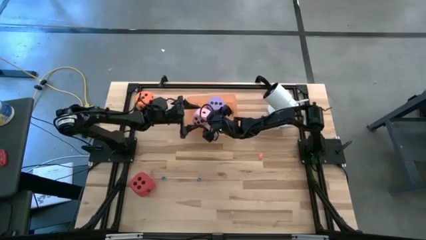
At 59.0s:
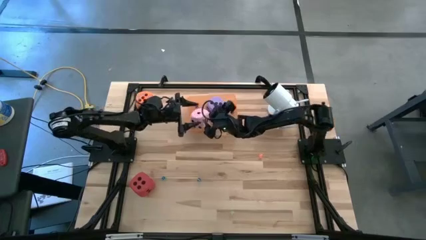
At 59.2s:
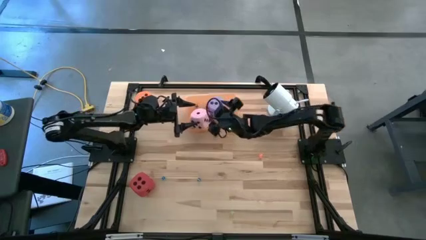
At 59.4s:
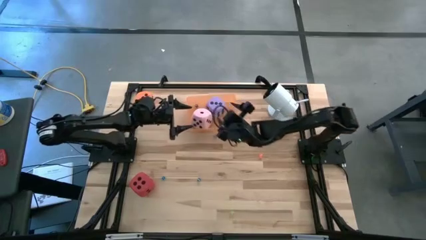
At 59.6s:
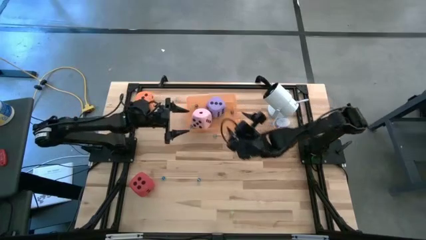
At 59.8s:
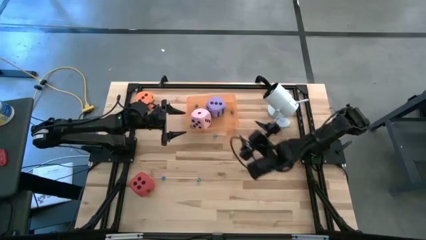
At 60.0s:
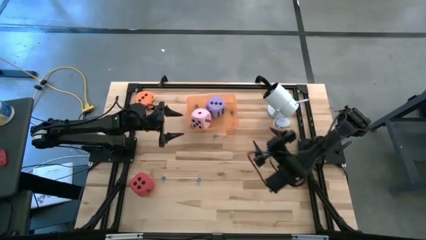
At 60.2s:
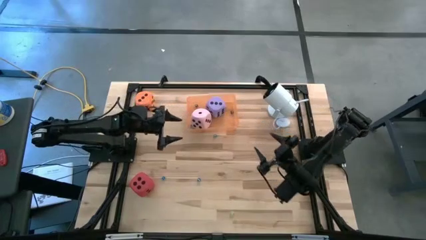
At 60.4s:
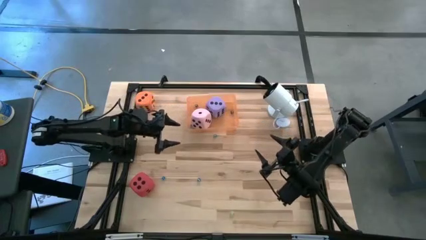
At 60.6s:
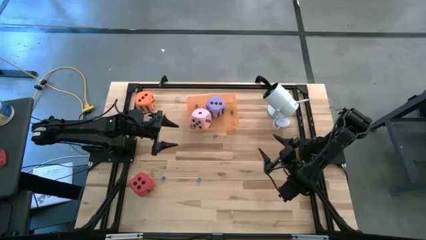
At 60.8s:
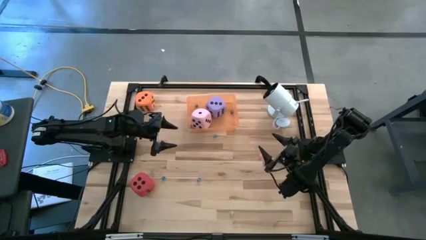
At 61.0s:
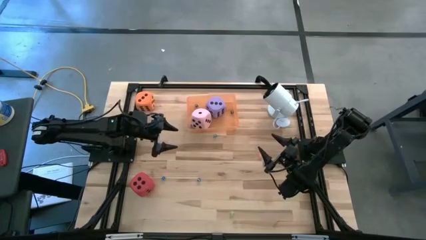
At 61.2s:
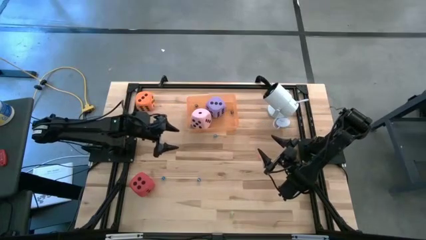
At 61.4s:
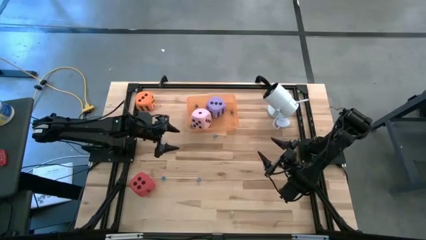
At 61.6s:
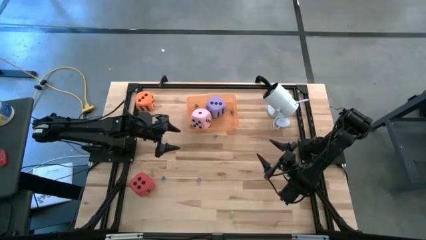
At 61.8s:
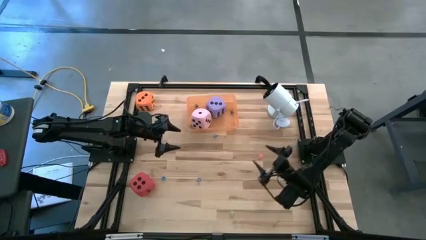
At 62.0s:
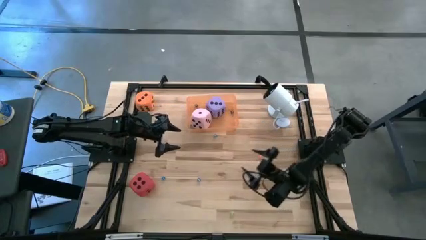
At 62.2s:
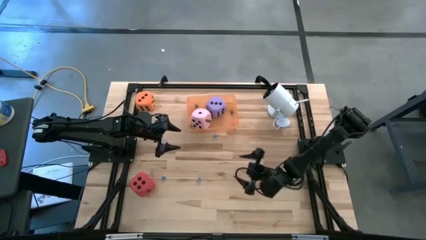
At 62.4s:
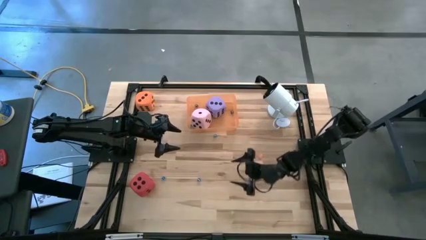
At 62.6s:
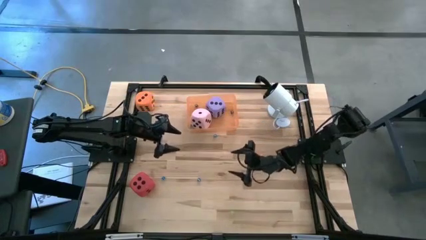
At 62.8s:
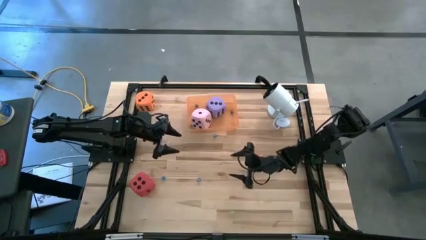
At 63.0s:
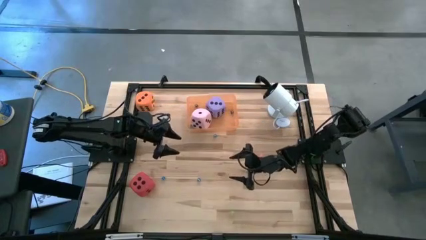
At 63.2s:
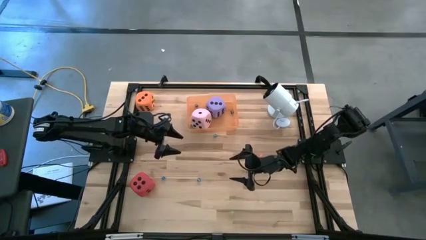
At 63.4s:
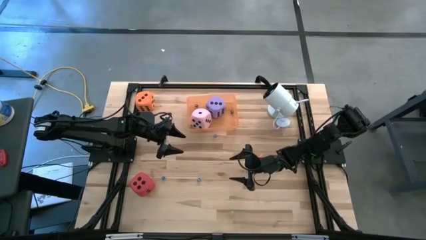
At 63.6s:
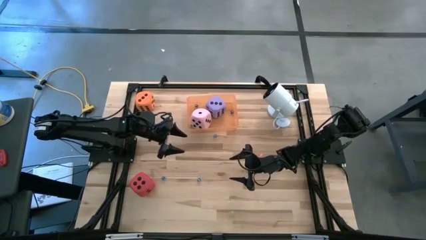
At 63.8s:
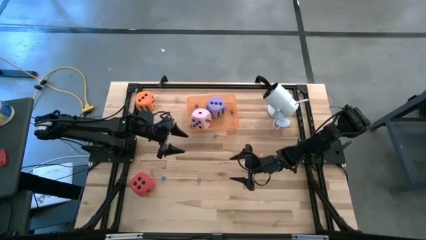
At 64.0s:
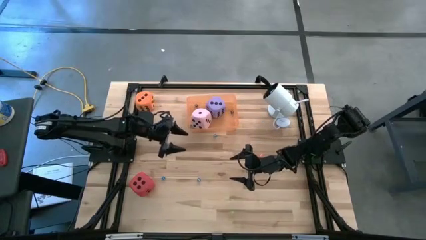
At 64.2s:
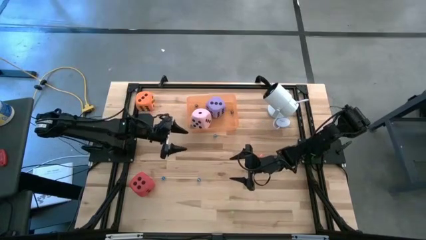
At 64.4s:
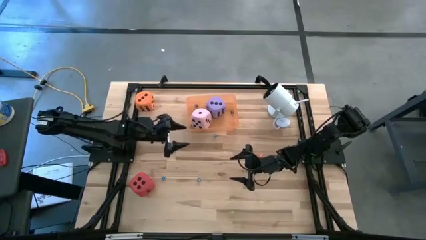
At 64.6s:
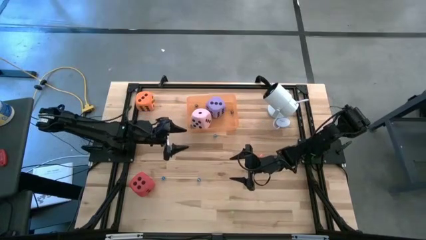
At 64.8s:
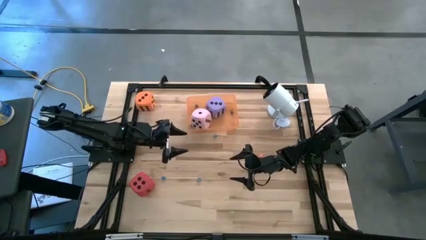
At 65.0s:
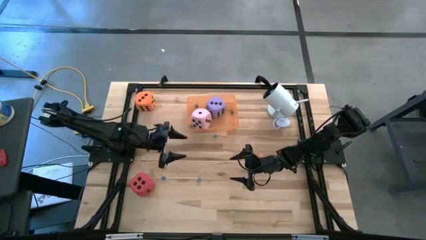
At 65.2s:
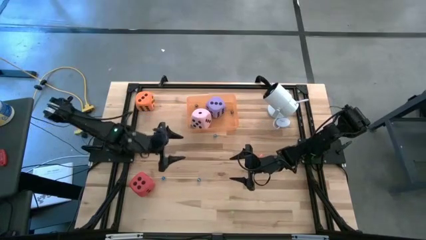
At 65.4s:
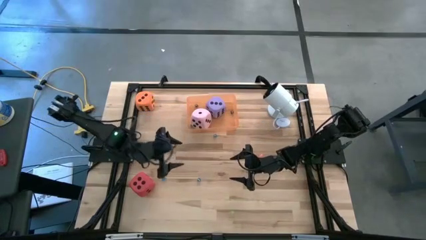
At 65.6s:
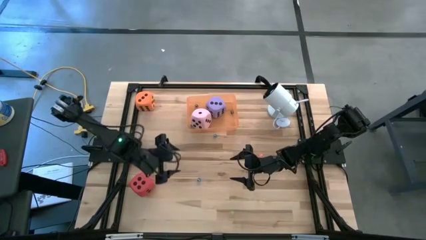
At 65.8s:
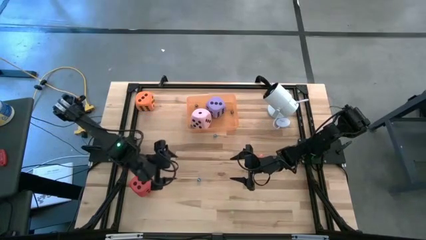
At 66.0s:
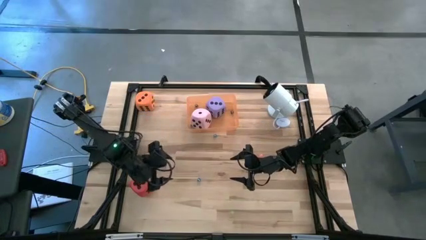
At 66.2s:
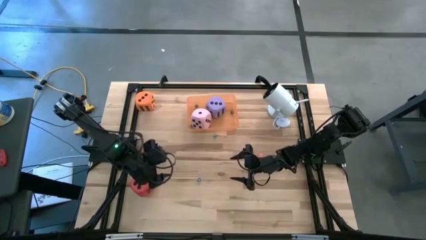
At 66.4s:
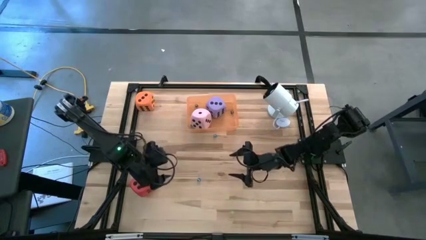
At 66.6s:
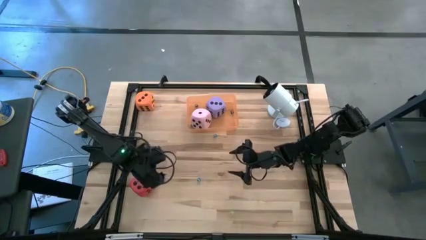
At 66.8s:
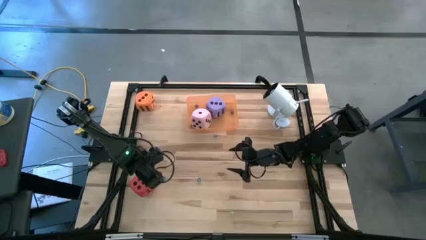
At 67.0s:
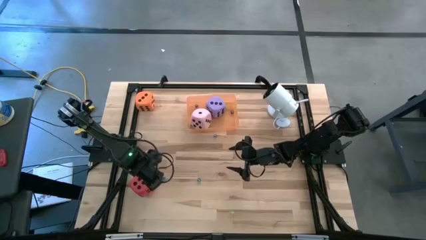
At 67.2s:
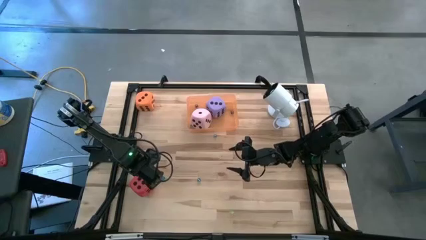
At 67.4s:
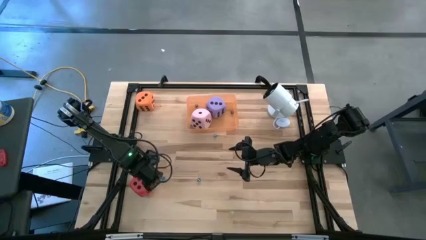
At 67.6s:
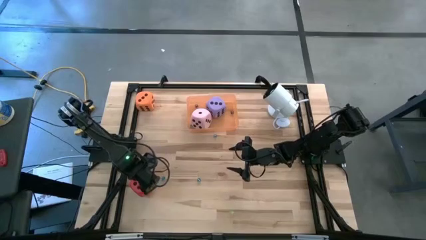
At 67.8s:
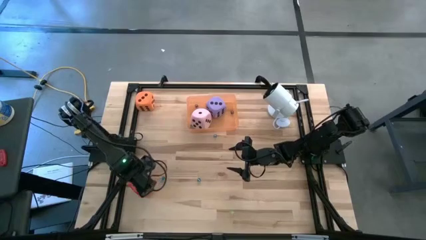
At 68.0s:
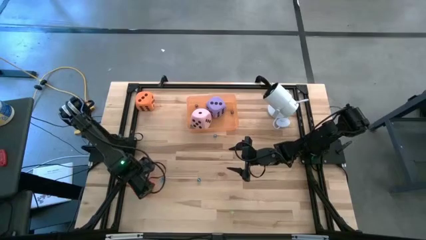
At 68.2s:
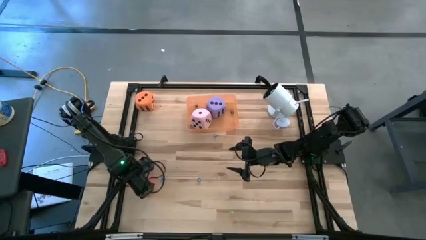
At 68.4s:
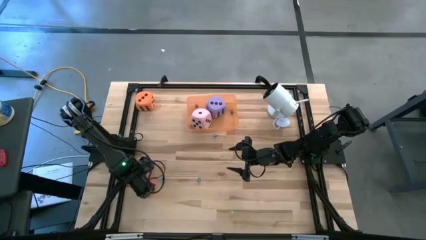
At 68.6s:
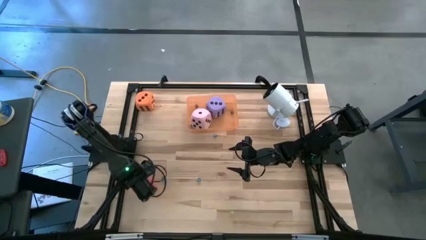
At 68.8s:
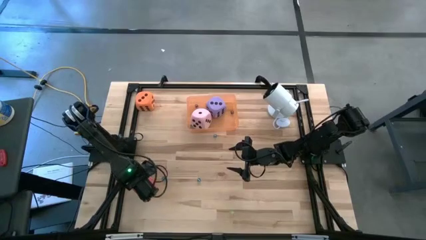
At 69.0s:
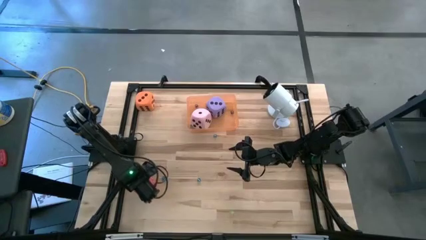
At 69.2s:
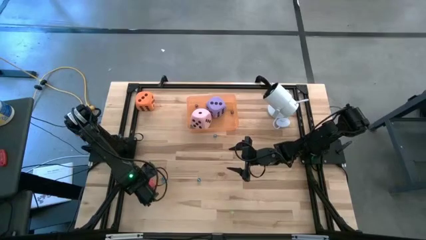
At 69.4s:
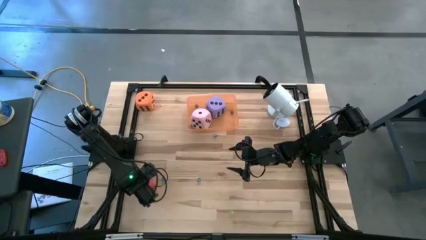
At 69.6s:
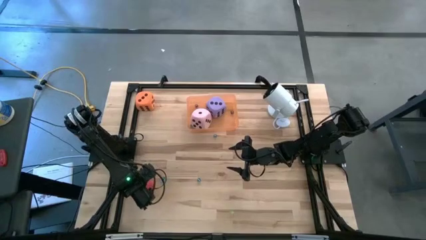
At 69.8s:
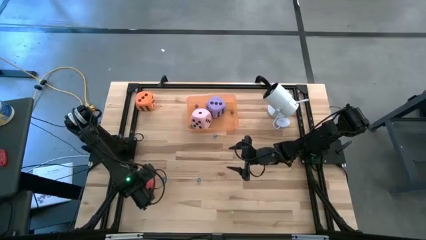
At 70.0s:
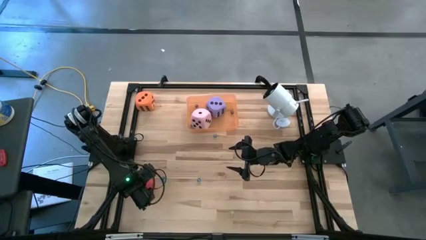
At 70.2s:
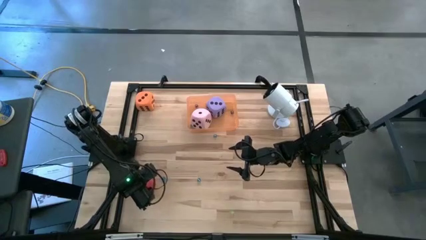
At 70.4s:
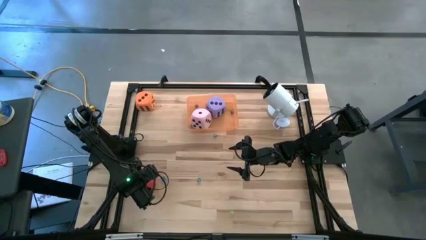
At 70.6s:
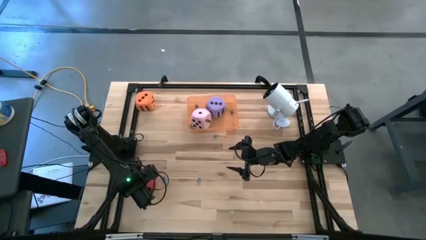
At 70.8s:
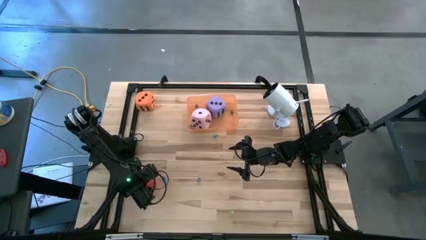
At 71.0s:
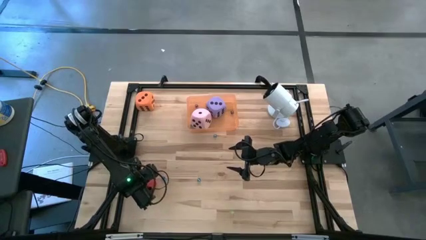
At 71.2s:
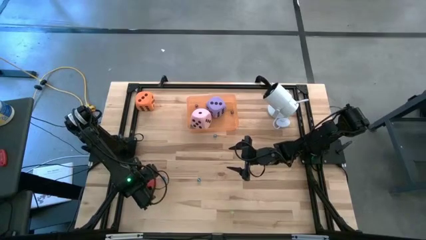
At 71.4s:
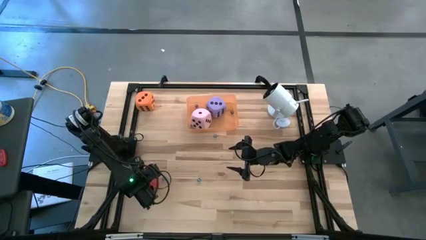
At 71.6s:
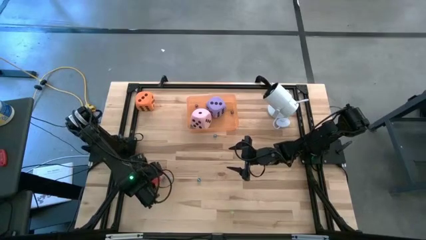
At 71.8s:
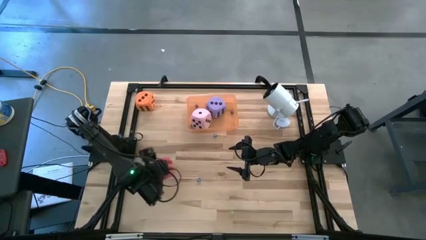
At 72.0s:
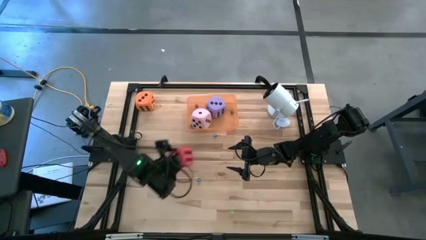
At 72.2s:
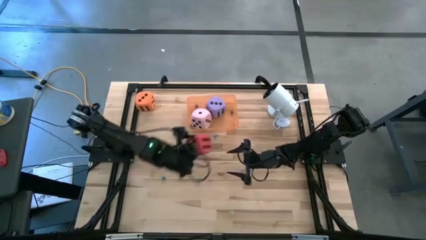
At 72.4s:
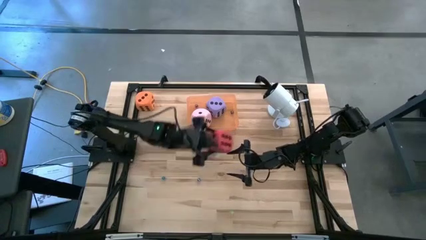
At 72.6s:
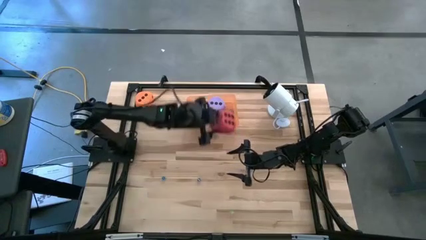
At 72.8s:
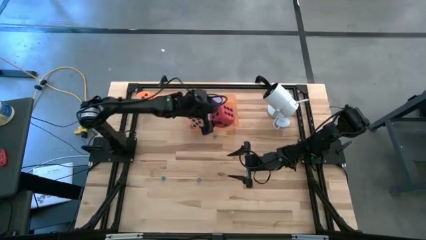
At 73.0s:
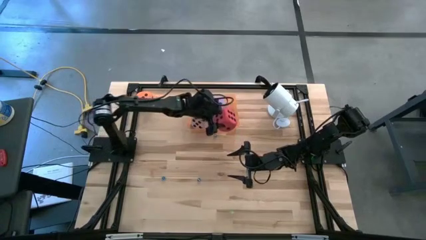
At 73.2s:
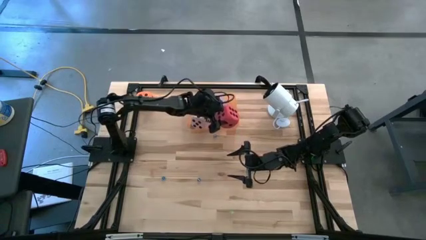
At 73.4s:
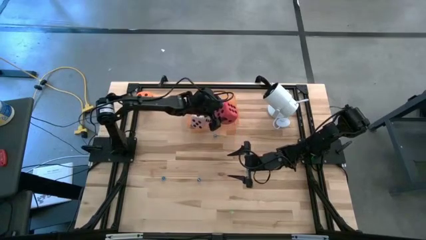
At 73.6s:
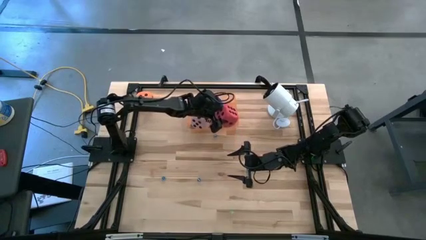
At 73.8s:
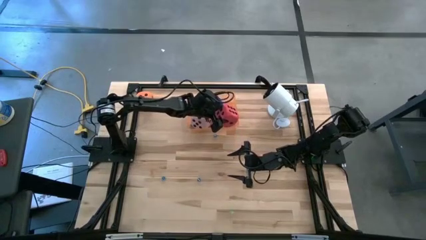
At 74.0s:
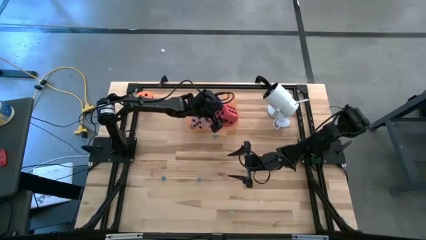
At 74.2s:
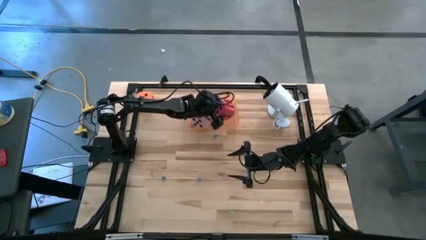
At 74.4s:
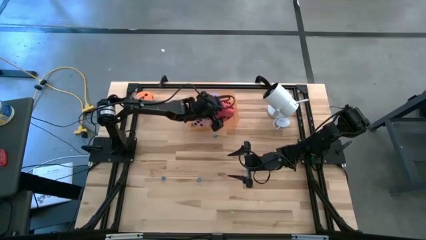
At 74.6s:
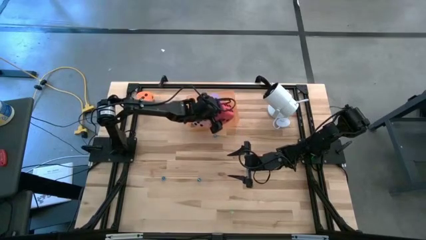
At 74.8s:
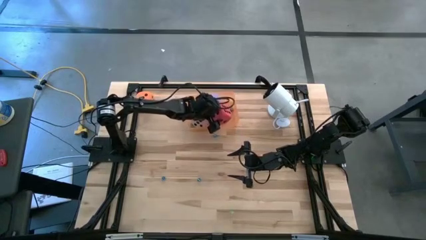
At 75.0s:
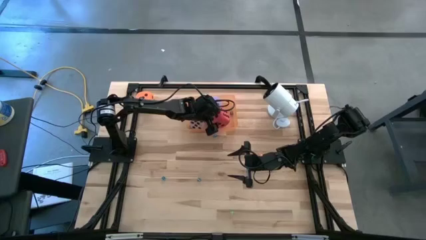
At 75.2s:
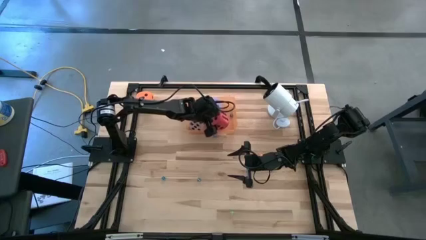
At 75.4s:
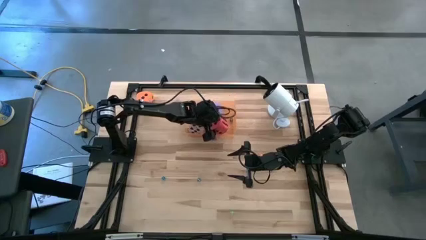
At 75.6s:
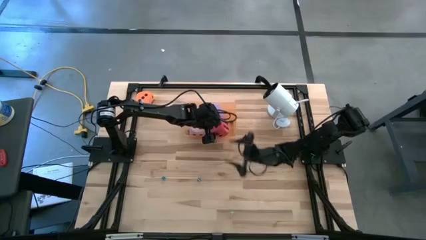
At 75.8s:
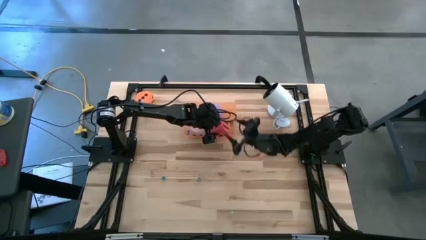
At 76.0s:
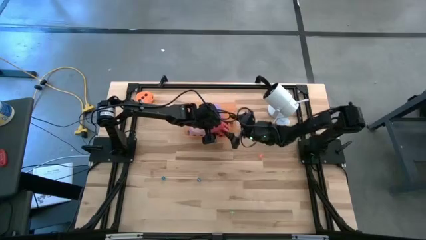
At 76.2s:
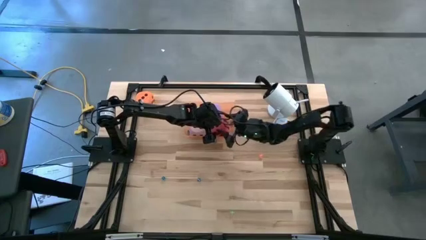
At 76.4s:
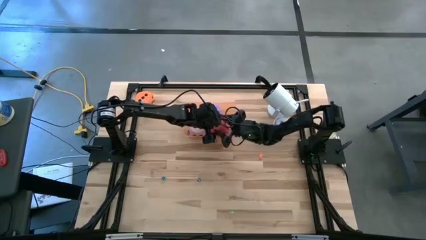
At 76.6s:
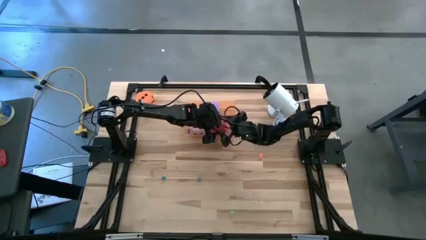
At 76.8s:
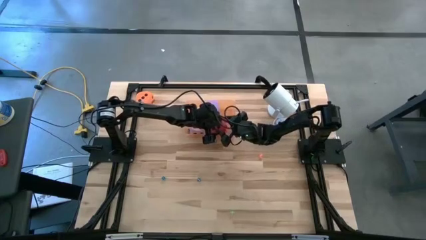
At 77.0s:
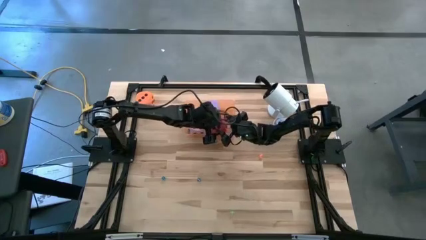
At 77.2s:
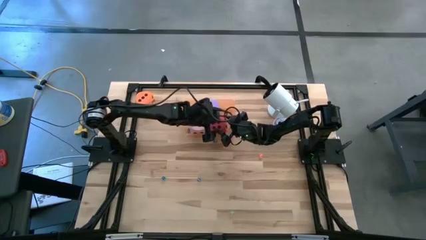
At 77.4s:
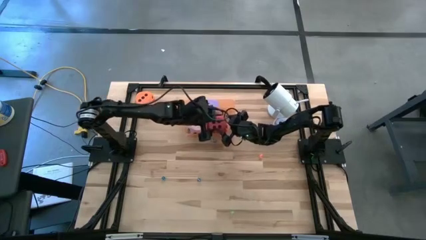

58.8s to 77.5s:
Task: Pick & Place Dice
Put the large red dice in the orange bin
